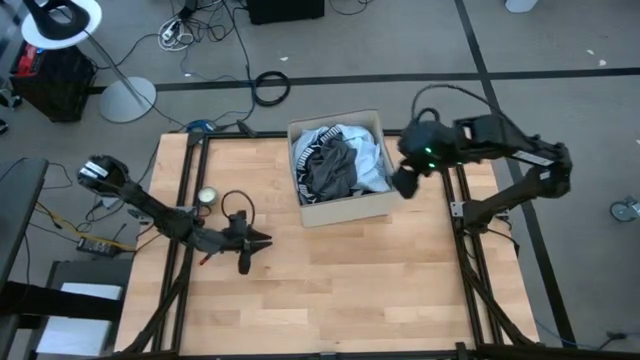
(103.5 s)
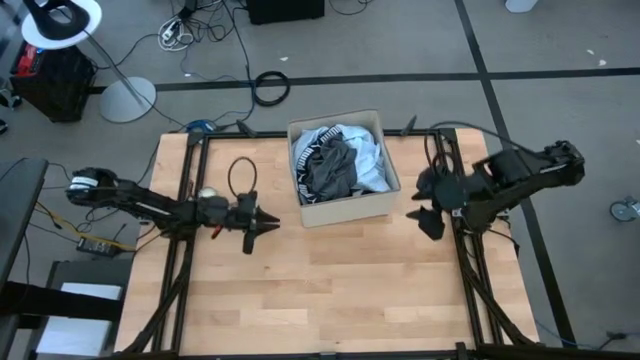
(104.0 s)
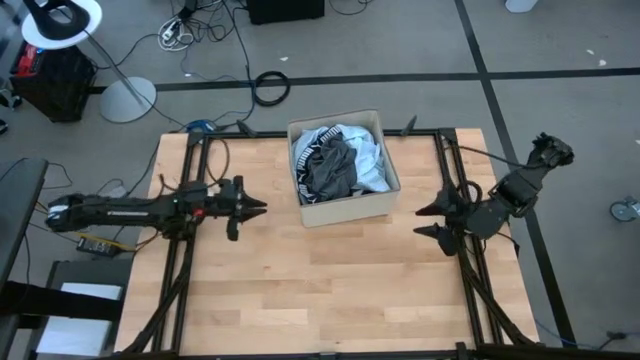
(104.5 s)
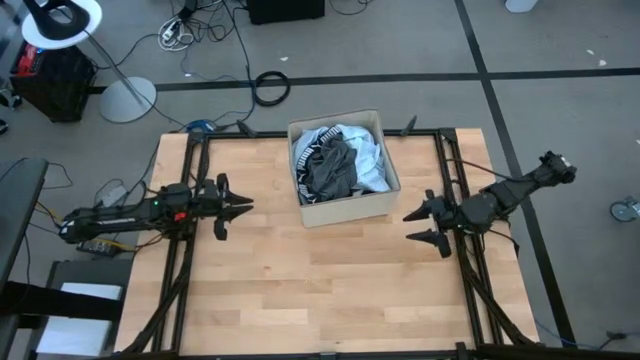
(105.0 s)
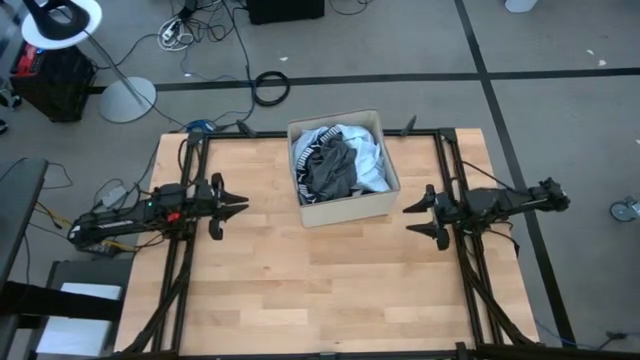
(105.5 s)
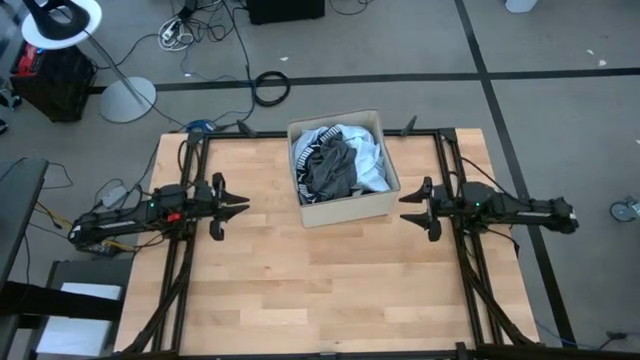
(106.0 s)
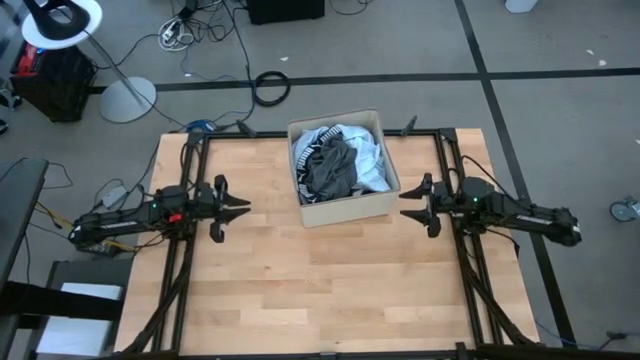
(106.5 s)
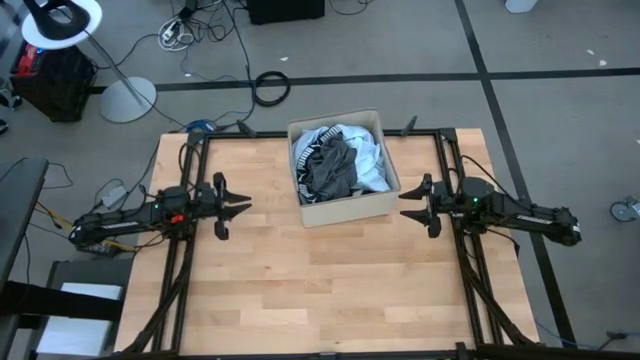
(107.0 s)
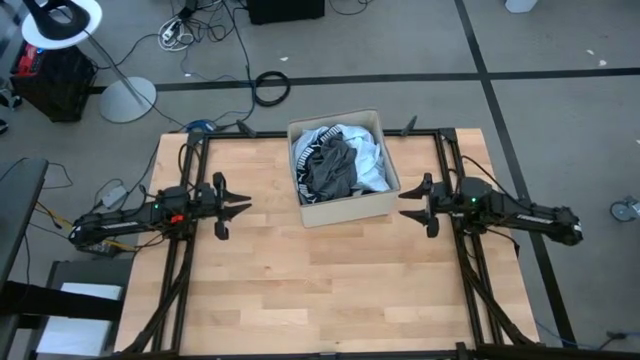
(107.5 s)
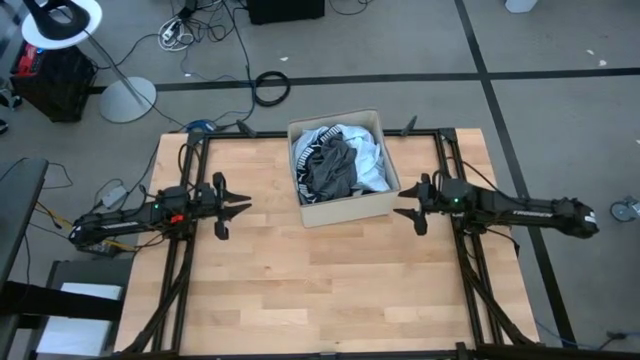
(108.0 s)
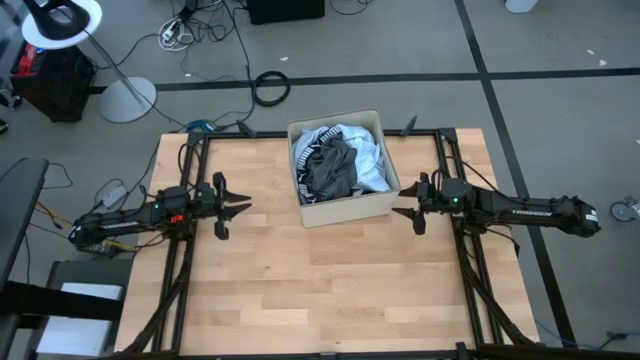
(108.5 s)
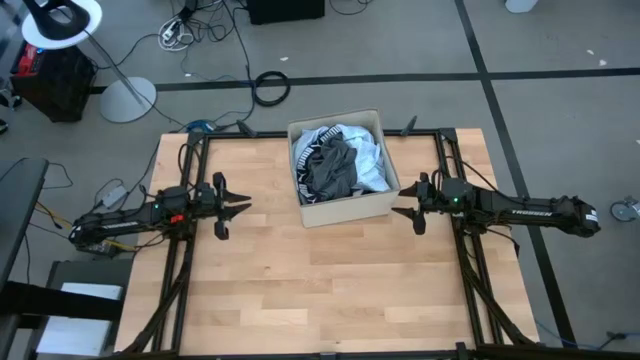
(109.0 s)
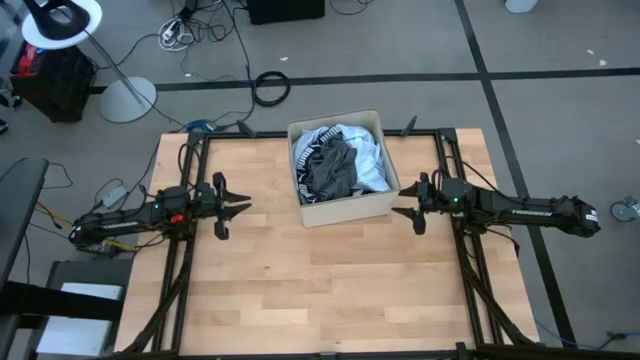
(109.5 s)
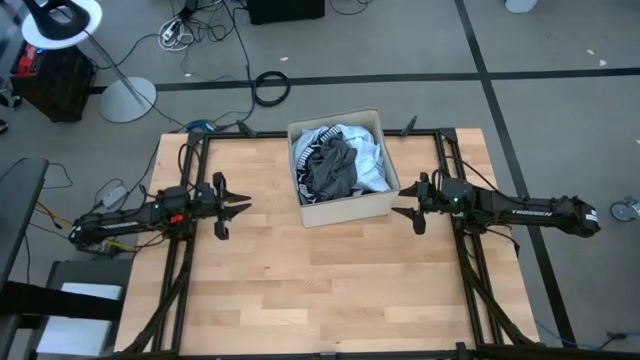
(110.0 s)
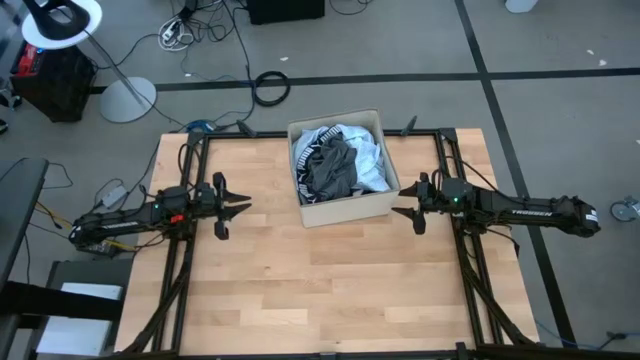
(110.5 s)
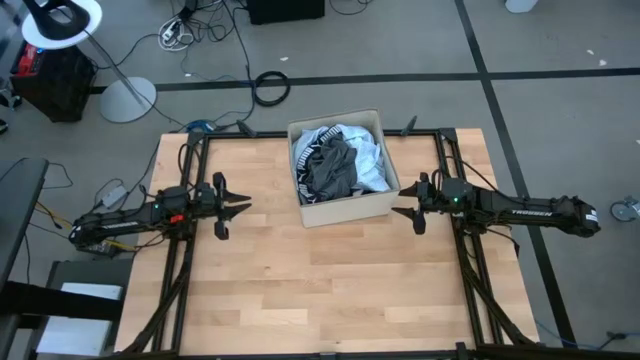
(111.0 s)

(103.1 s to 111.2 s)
Task: Sort clothes
Return to Home Position

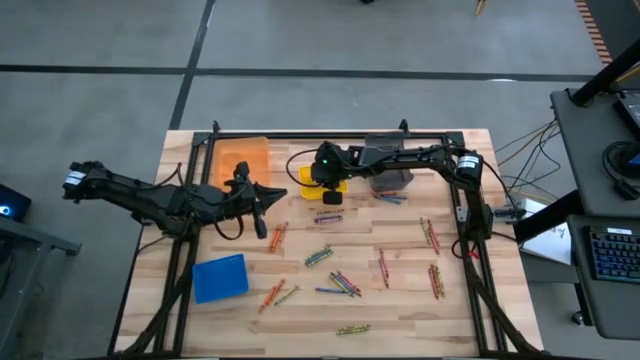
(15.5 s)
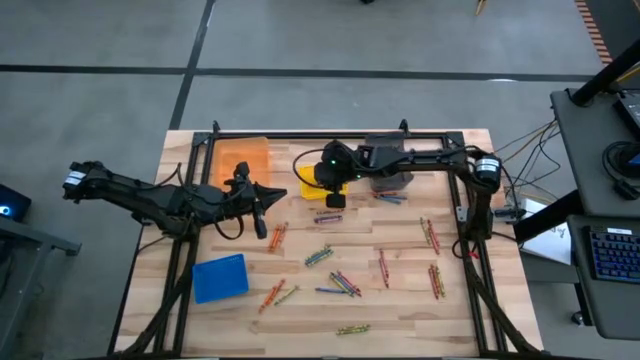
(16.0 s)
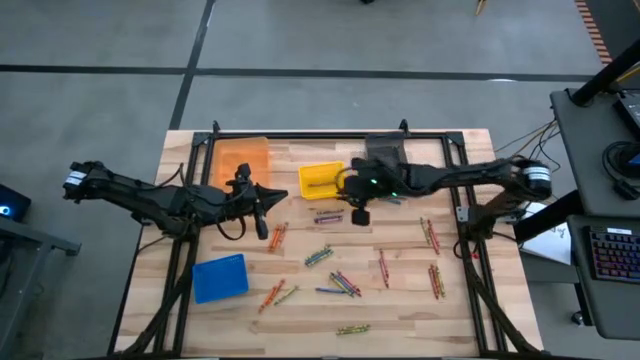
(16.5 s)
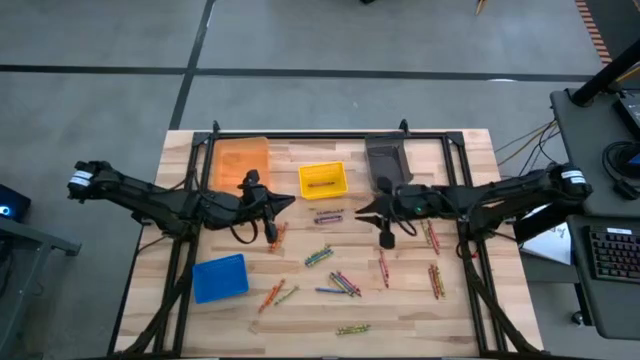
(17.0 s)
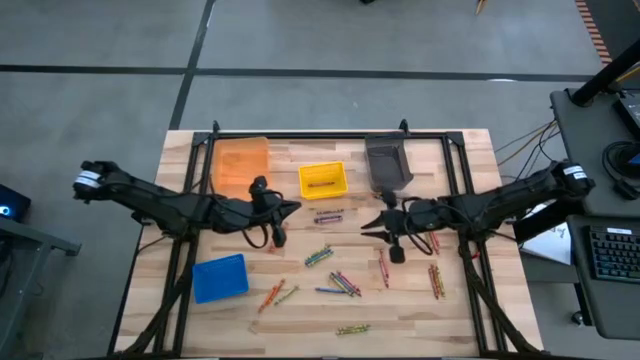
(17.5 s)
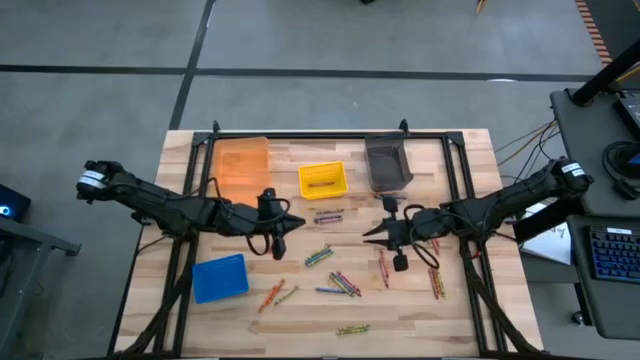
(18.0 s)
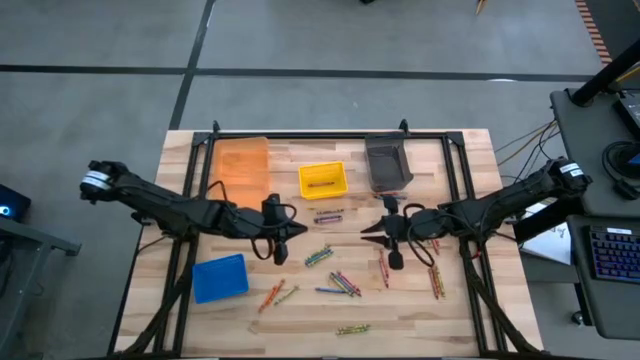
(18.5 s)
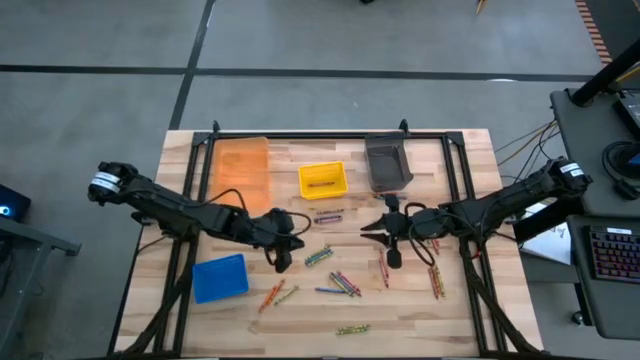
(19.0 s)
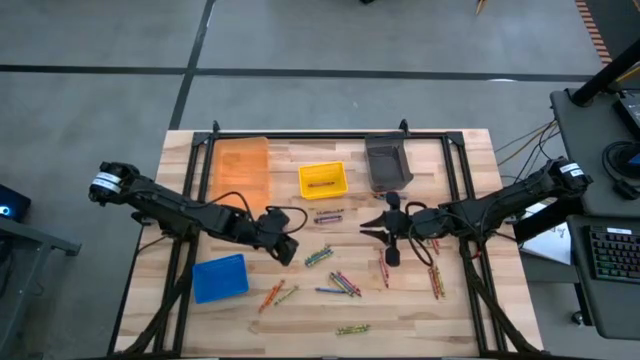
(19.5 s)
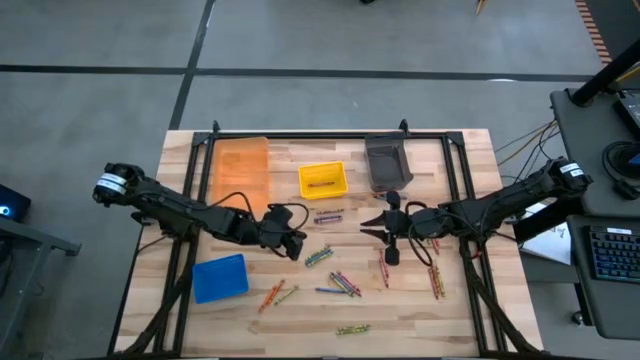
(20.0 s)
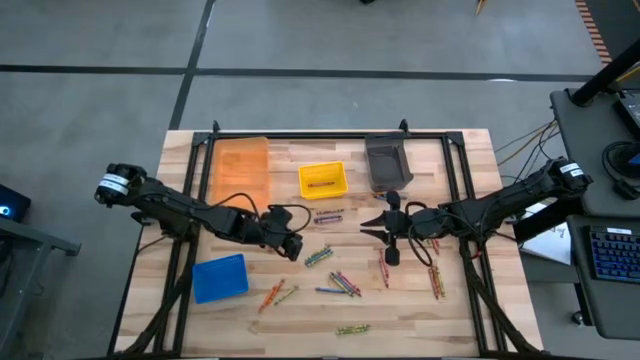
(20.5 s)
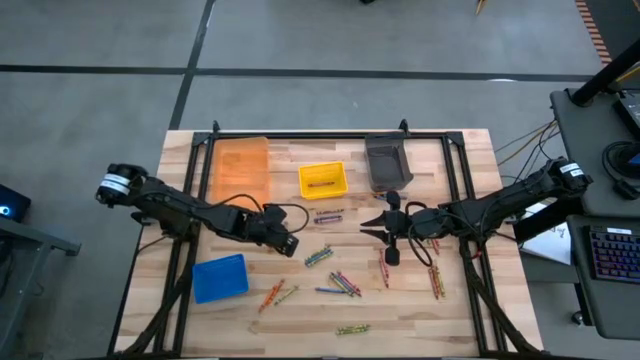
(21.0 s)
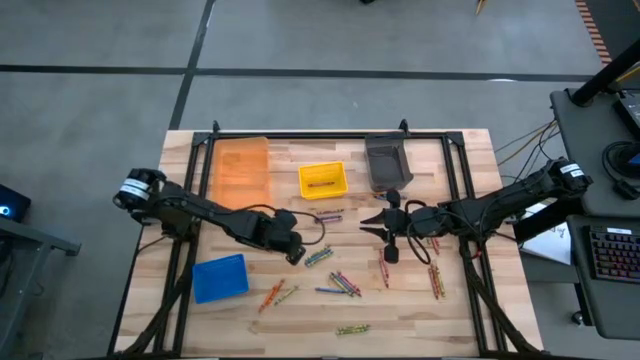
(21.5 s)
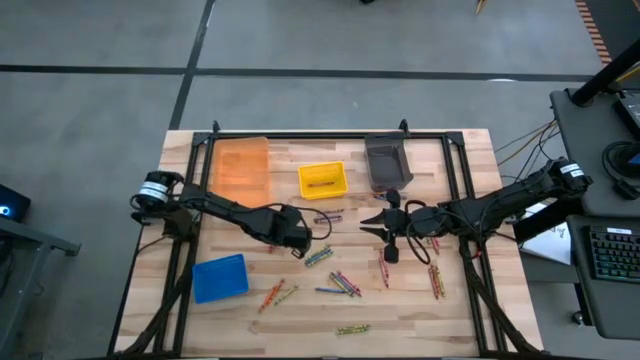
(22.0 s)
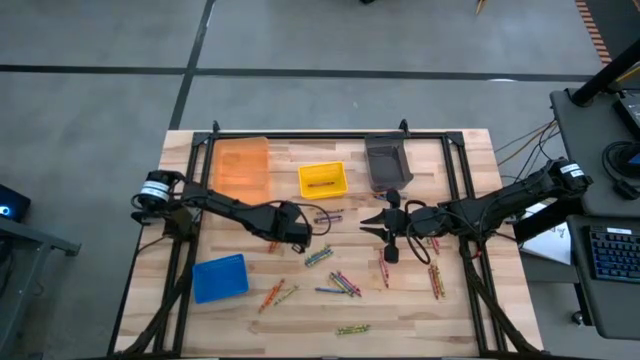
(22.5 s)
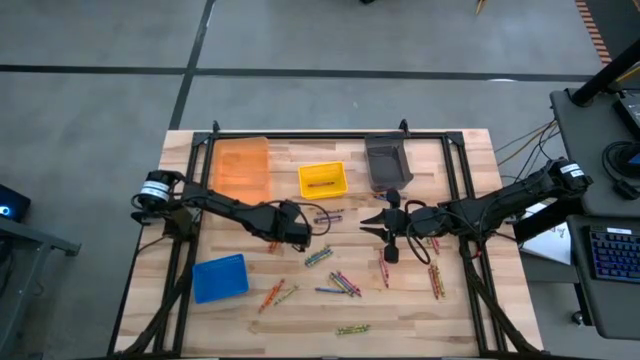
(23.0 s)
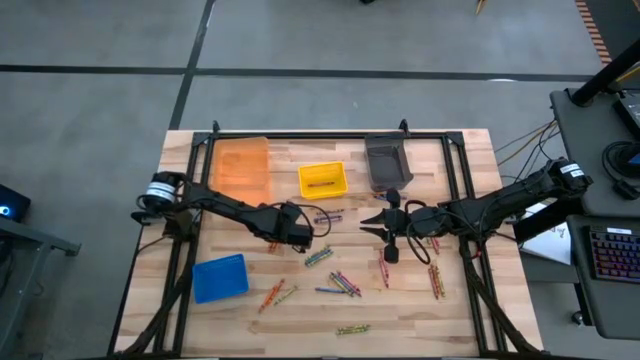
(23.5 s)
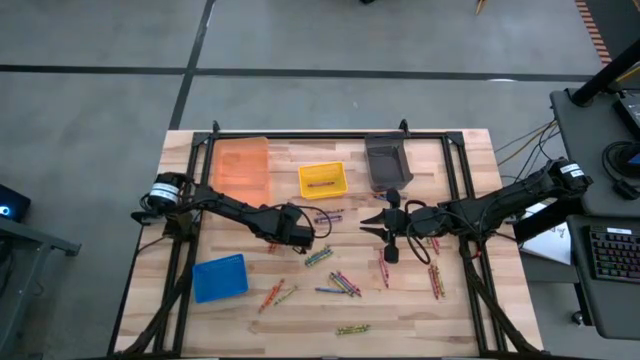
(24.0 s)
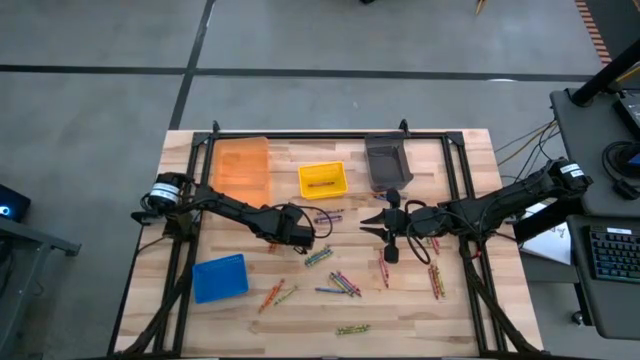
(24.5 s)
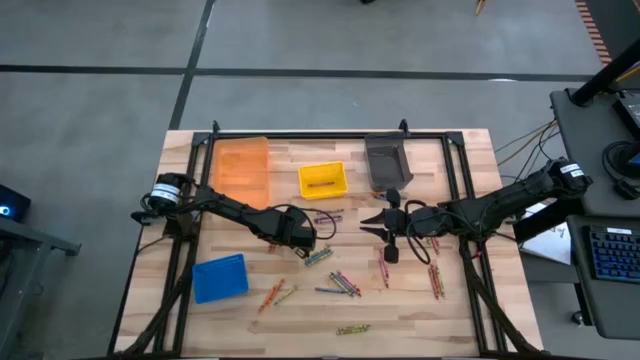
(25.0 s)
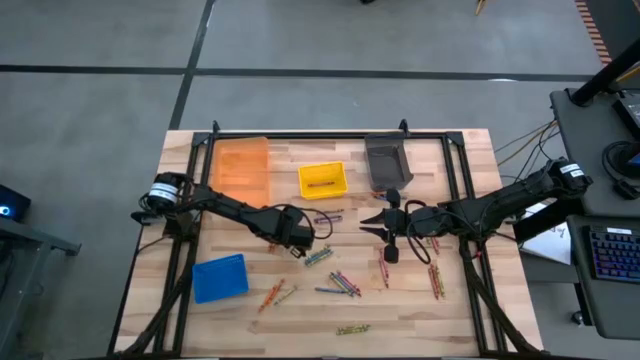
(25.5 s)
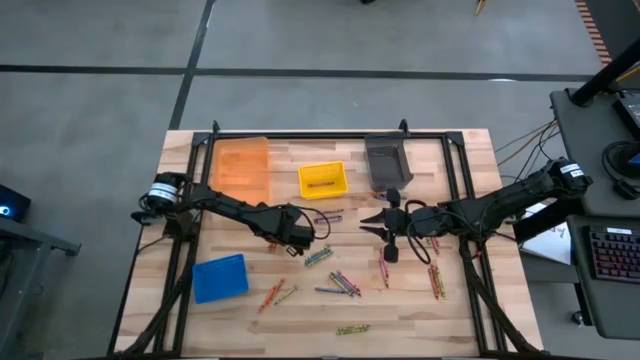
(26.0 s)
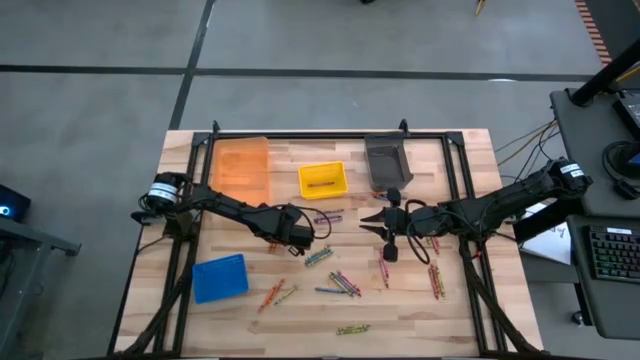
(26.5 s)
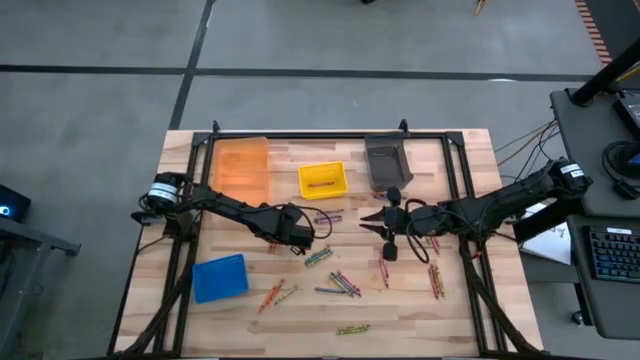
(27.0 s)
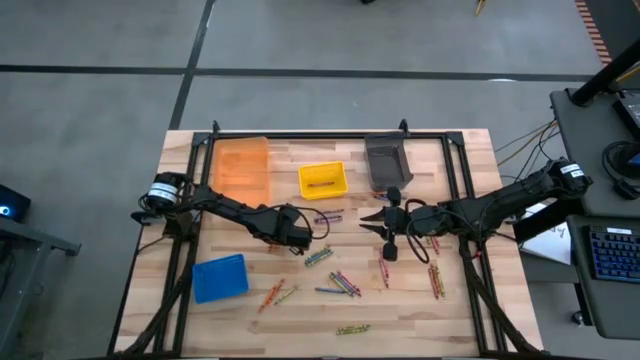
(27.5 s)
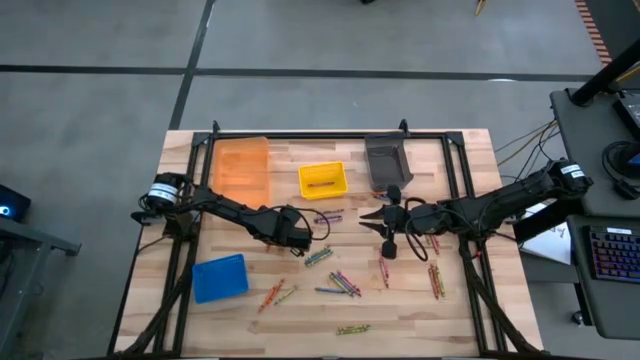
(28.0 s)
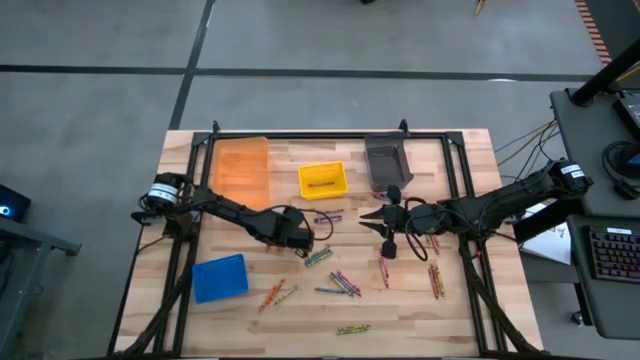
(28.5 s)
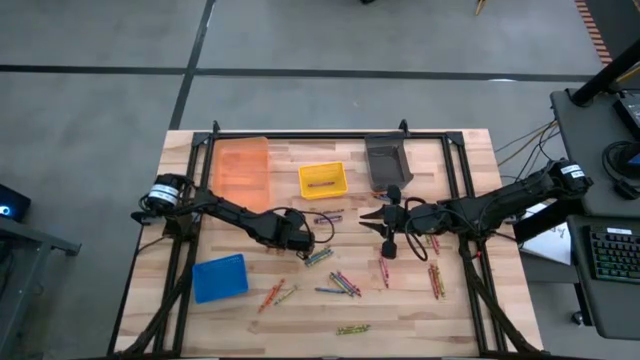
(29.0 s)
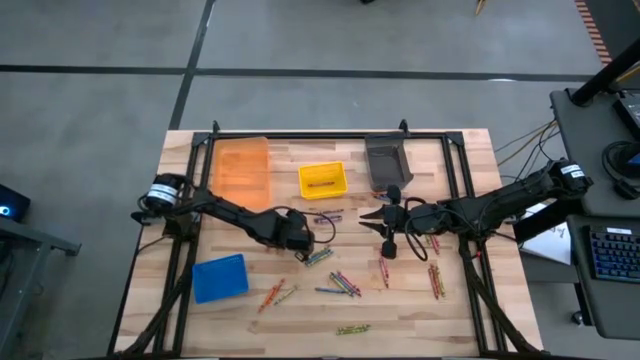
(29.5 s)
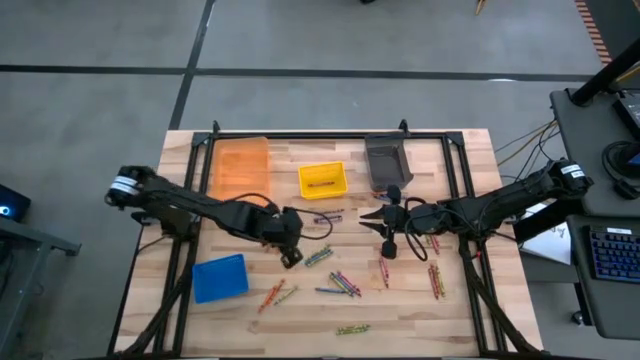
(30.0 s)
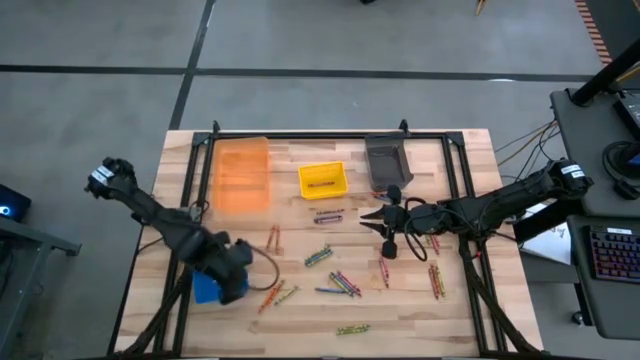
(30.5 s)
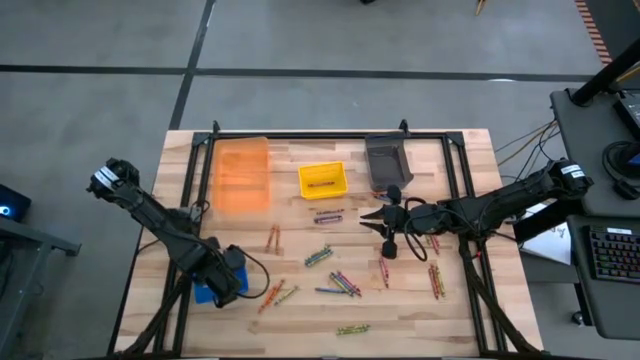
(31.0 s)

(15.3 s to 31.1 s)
Task: Sort crayons
Put the orange crayon into the blue bin
